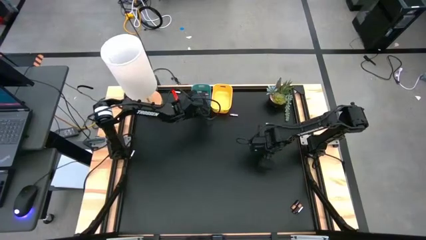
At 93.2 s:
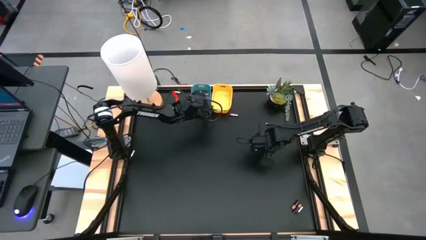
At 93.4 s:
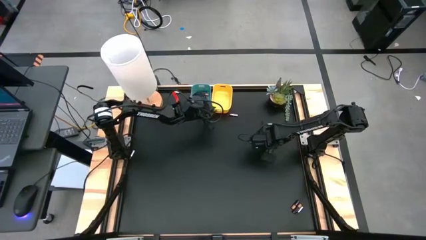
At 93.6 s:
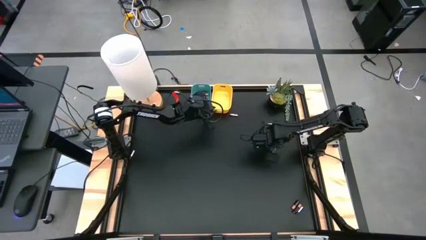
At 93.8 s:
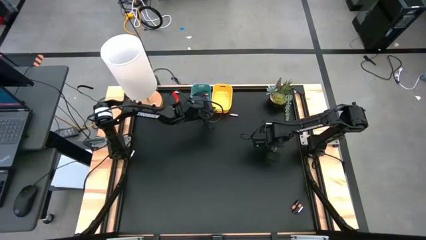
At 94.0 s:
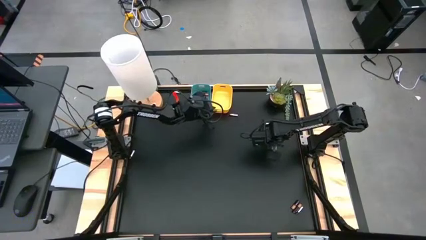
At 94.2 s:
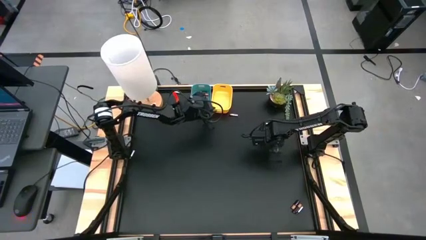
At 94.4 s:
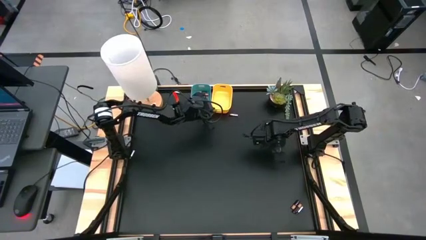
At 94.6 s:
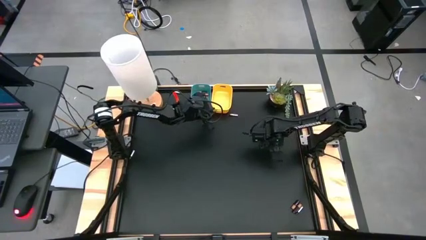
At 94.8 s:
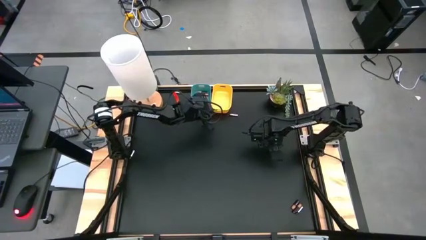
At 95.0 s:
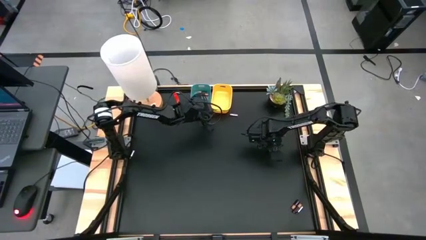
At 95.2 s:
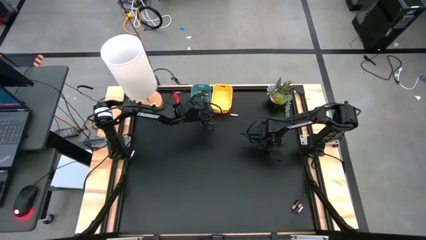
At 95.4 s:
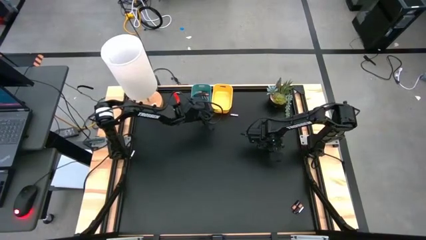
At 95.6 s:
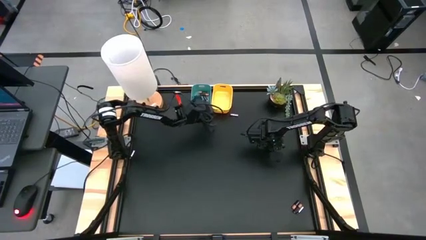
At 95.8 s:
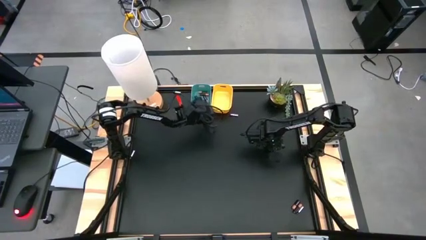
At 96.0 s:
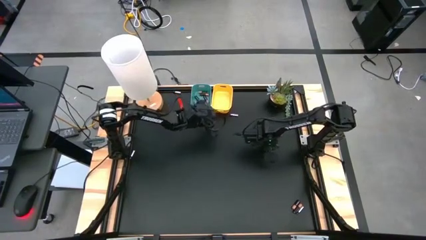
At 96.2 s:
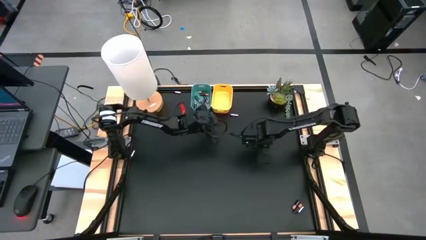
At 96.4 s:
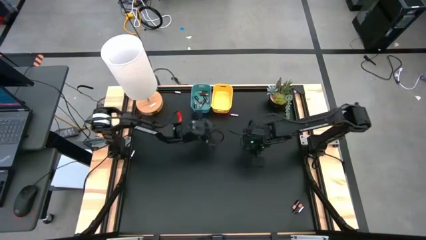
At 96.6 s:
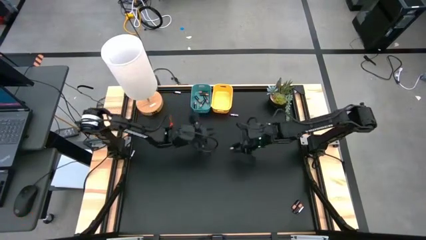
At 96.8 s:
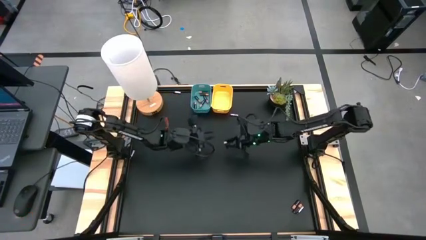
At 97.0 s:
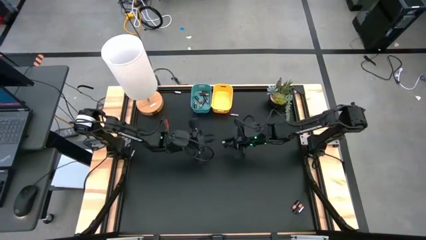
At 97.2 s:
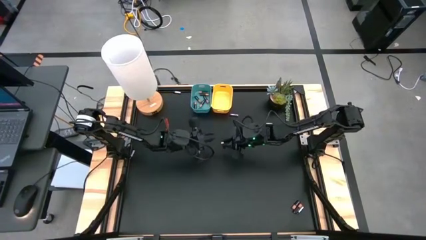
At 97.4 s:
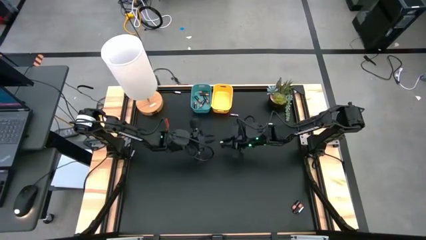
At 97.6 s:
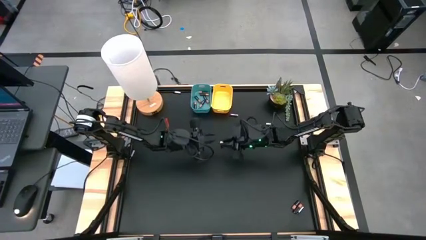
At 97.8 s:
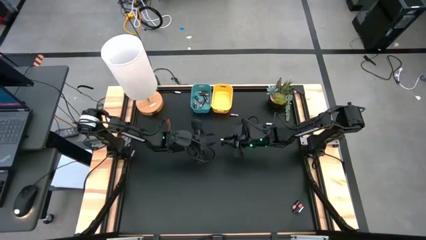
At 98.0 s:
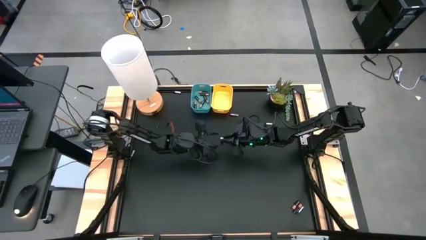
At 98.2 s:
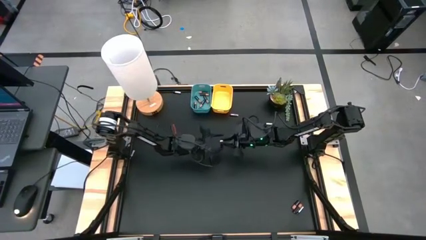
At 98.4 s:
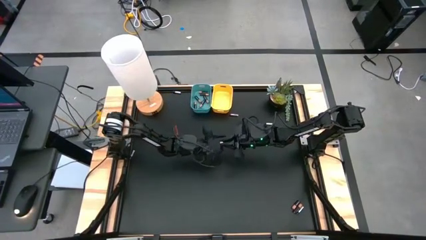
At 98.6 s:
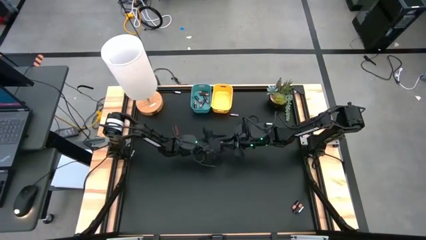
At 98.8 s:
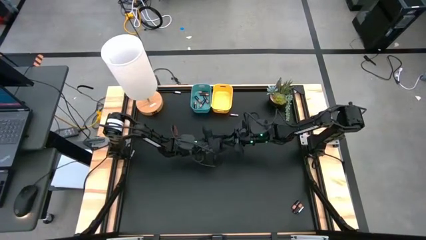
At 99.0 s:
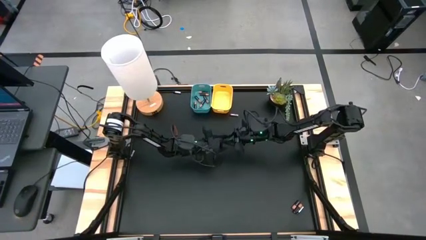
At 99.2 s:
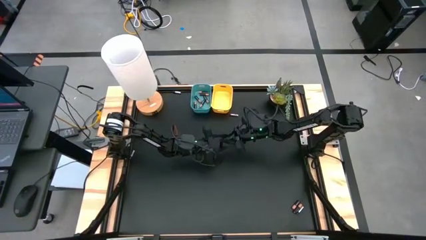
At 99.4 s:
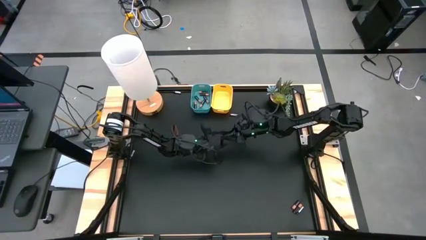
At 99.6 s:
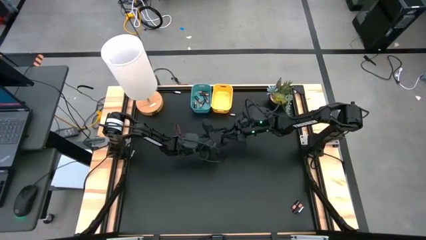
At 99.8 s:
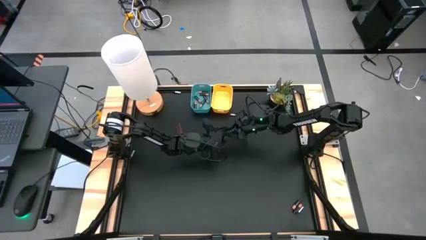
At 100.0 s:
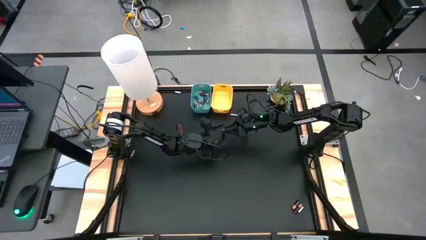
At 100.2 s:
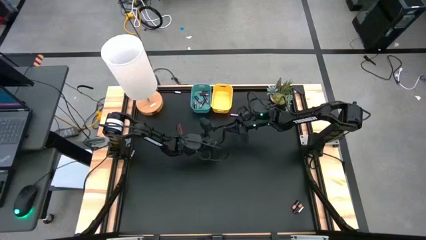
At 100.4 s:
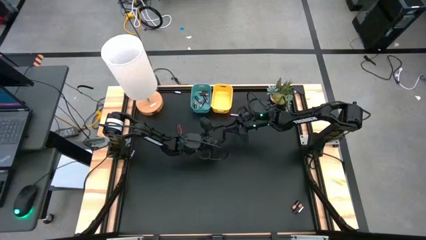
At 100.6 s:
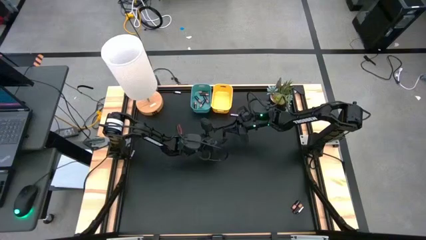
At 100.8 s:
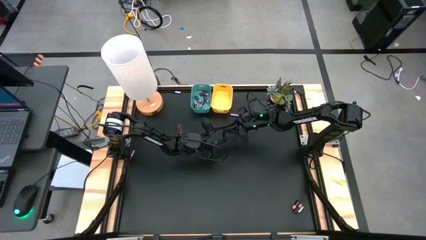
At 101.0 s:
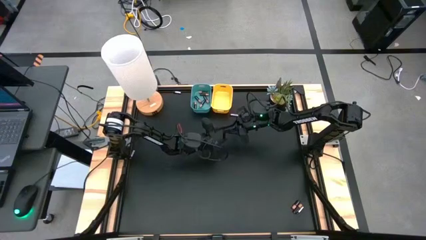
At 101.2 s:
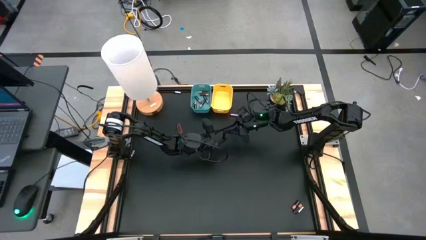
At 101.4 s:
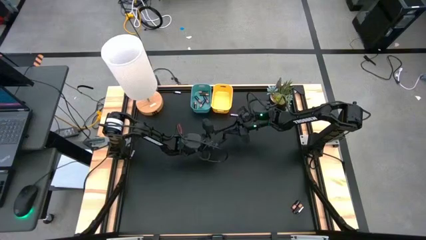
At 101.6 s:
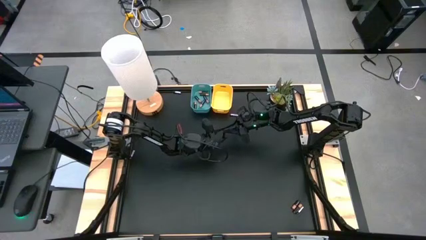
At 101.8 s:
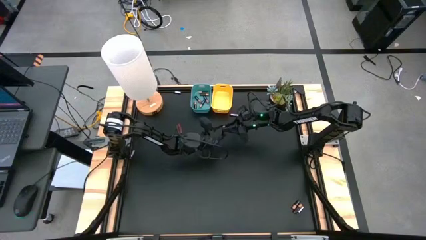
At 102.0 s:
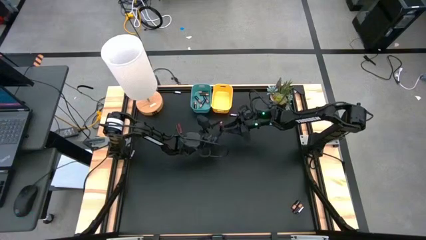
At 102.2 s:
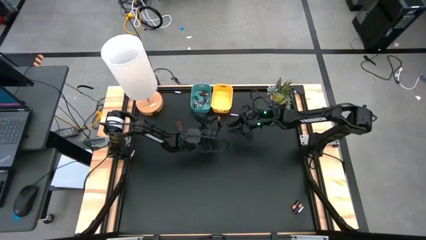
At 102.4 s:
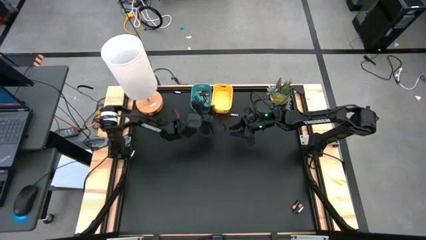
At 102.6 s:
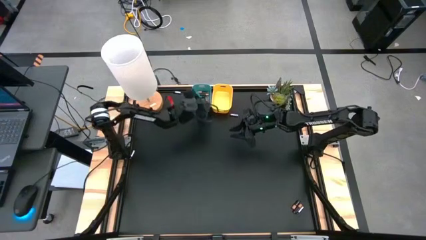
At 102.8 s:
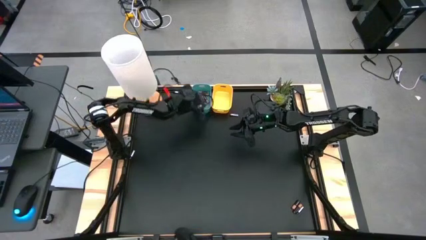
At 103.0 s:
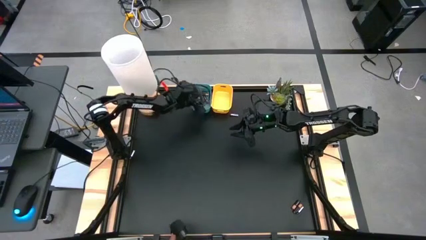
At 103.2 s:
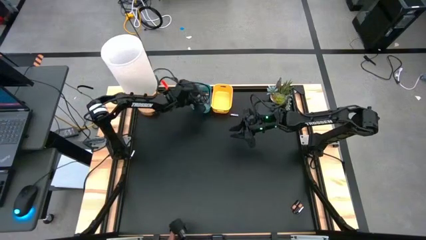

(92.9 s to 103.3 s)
Task: Sort batteries
Put the gold black battery into the blue bin

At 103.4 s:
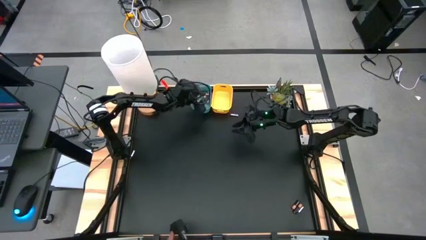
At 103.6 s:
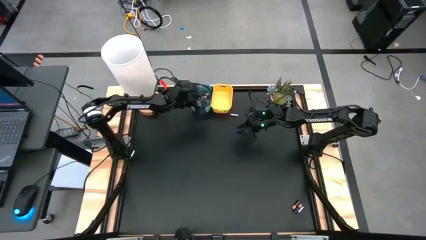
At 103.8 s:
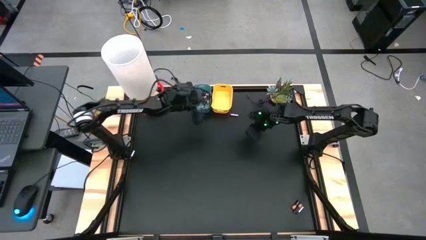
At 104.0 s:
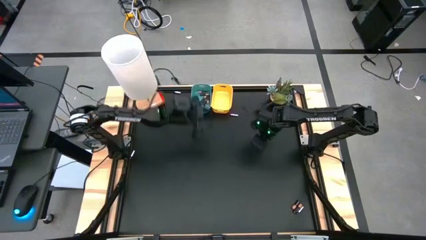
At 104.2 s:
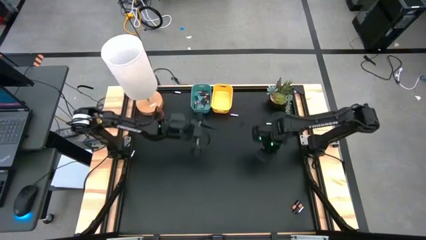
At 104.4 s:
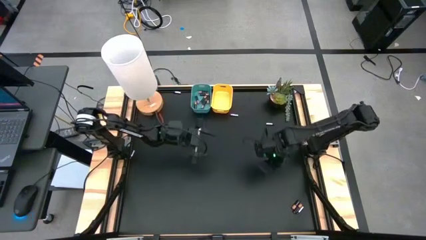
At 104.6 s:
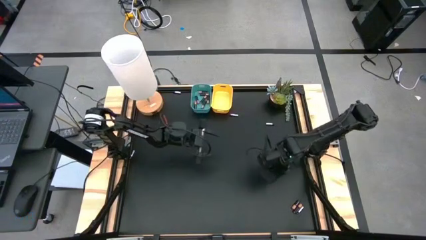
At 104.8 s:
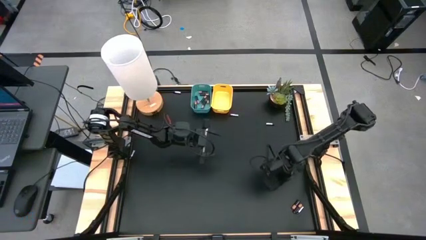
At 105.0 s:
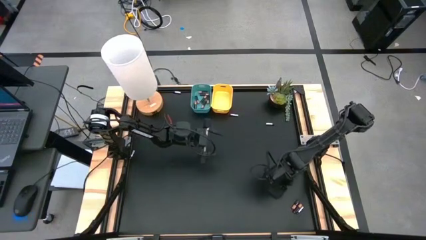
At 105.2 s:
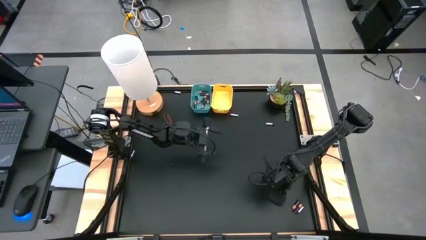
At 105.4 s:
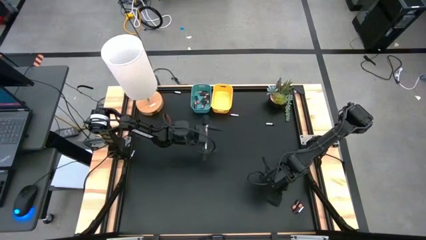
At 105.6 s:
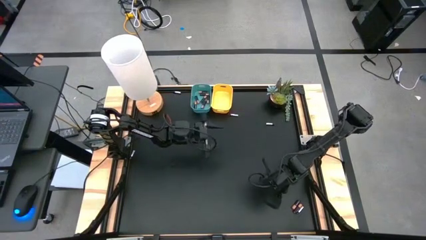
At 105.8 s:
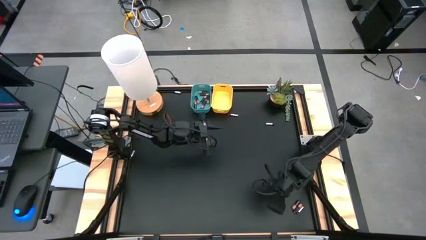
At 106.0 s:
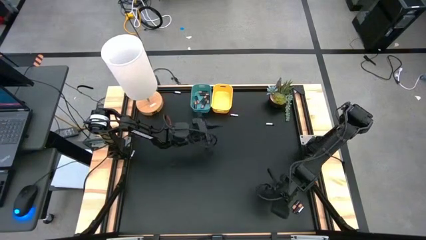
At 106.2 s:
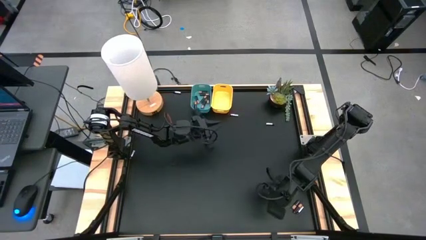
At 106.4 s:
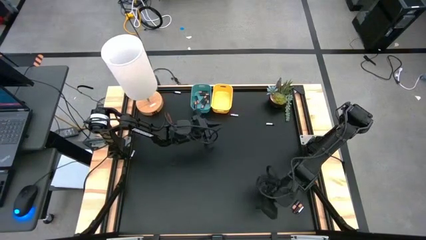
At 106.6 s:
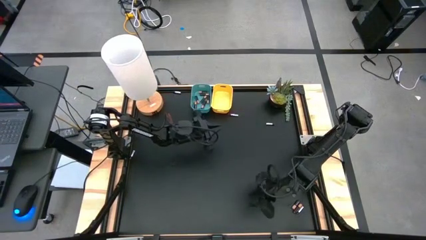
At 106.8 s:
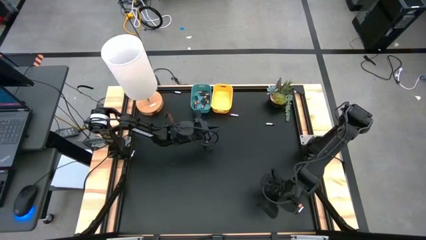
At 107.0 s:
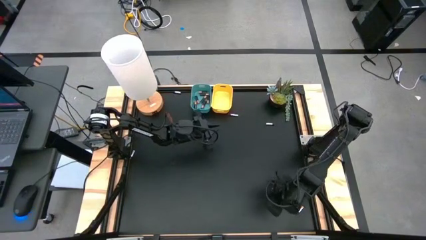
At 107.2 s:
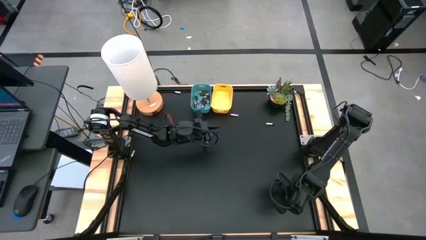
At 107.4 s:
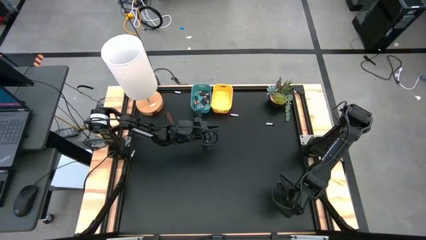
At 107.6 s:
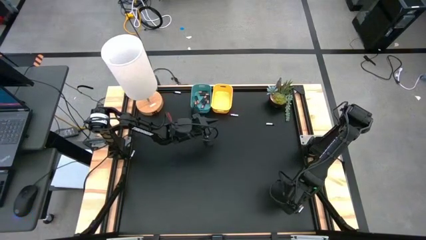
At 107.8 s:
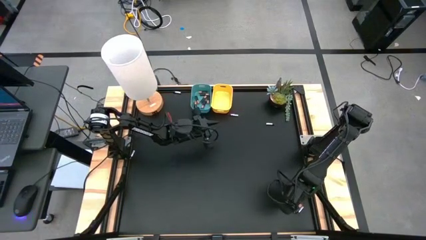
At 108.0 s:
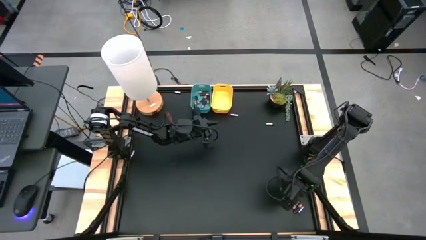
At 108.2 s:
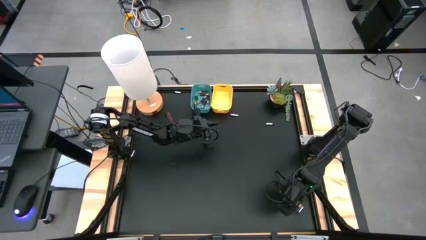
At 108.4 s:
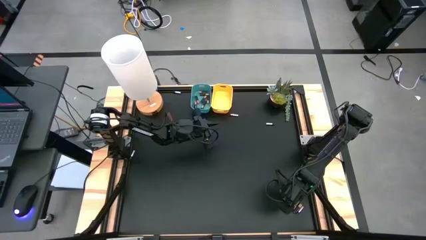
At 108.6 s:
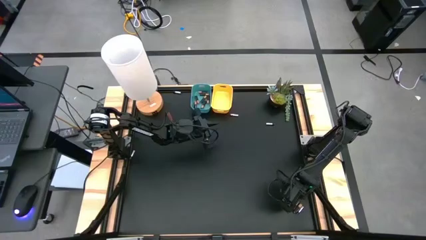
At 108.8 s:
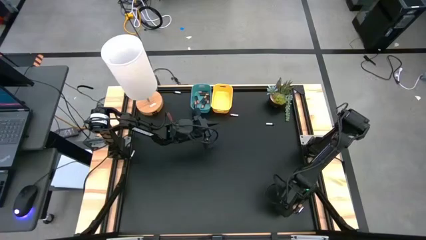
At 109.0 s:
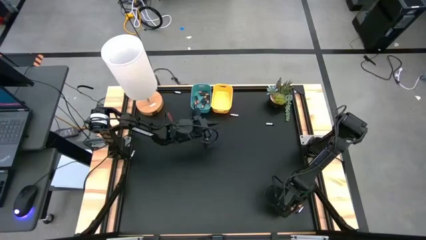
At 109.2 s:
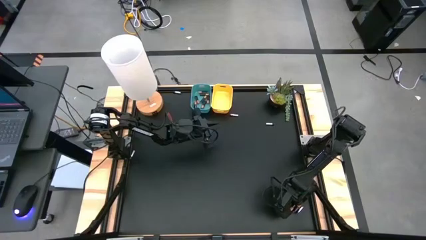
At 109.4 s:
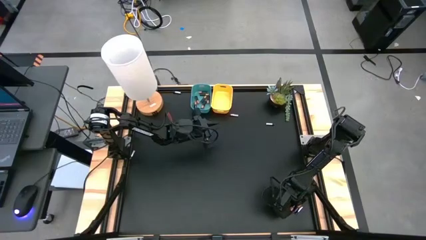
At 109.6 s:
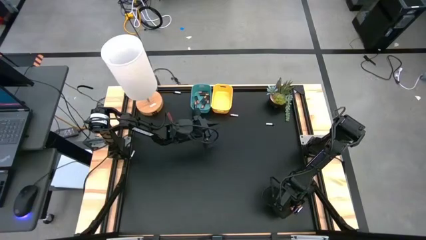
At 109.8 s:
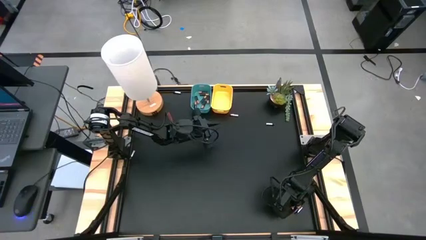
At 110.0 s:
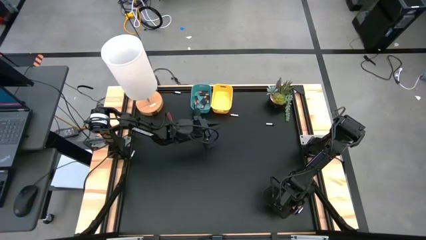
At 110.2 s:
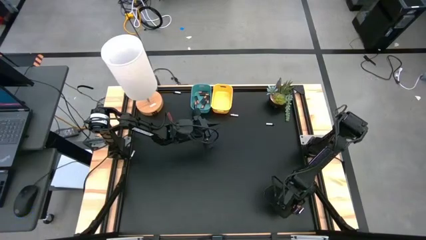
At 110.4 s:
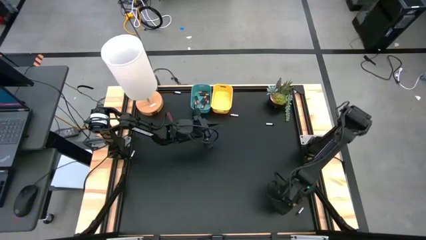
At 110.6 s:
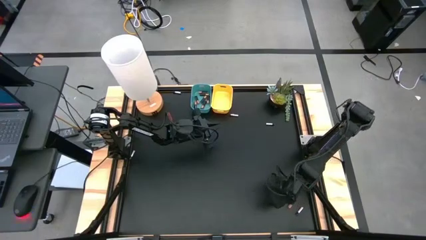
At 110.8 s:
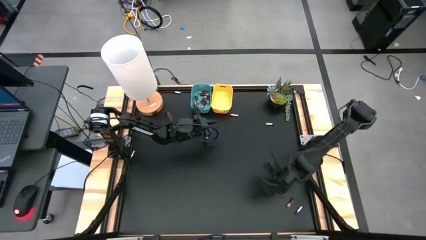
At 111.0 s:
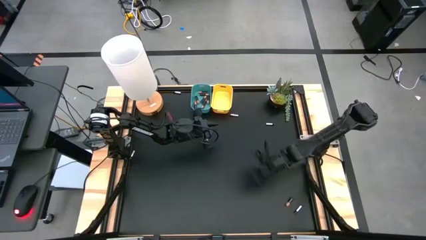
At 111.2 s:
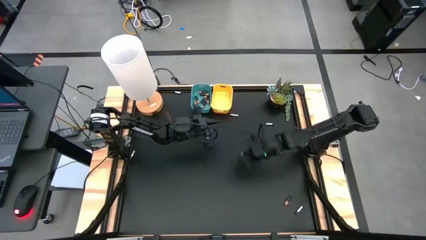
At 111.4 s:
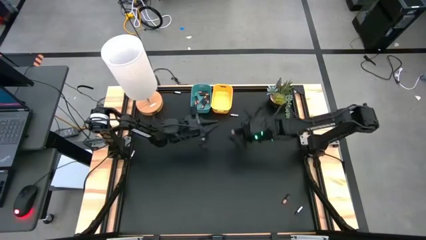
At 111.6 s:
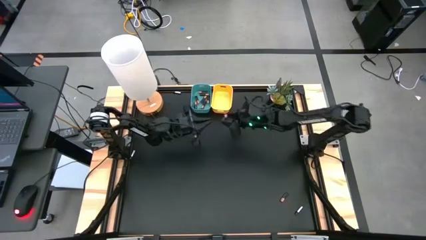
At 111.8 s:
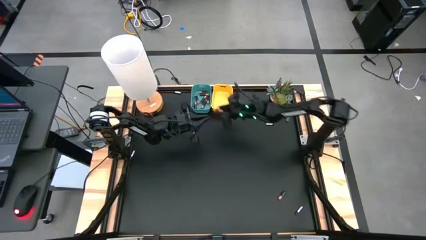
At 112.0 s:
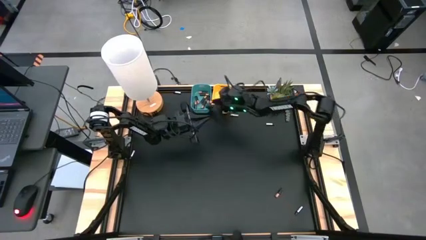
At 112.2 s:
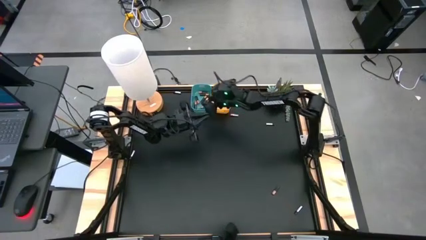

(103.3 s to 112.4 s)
Put the gold black battery into the blue bin
